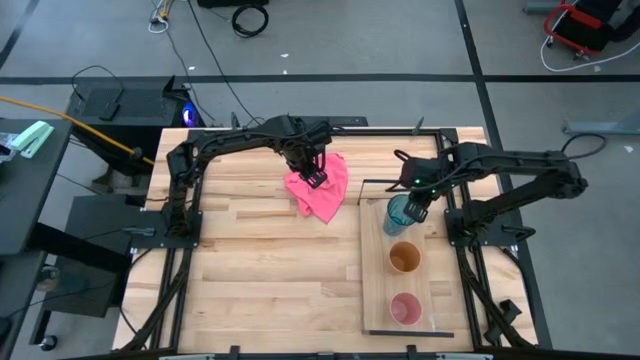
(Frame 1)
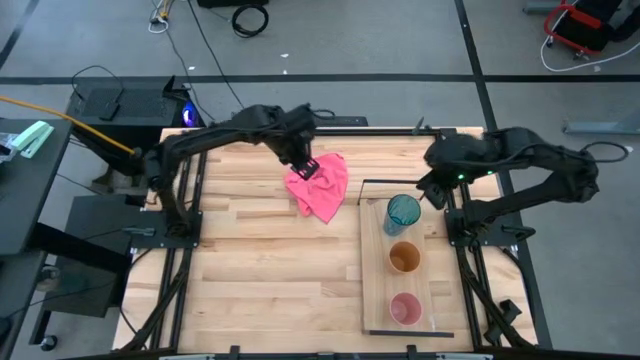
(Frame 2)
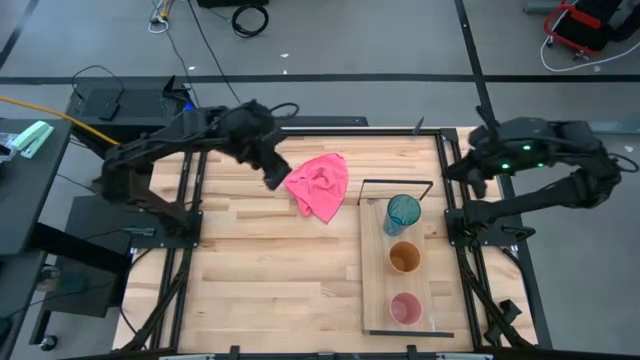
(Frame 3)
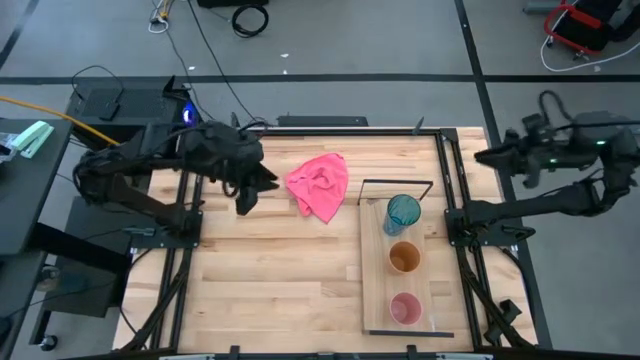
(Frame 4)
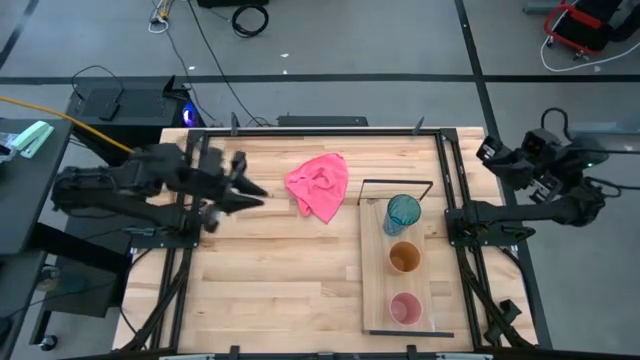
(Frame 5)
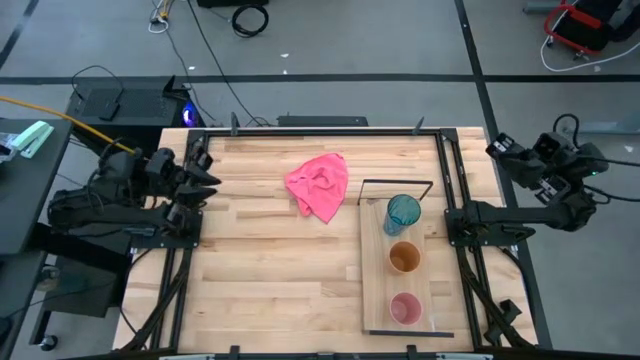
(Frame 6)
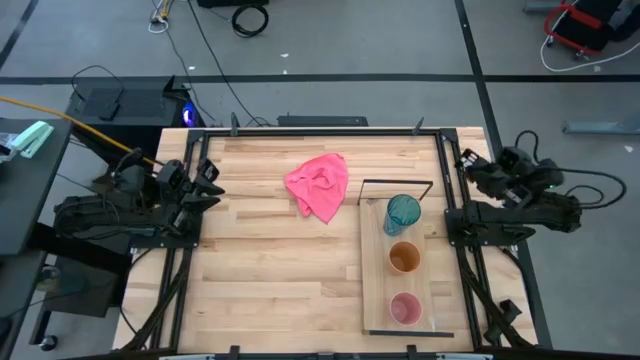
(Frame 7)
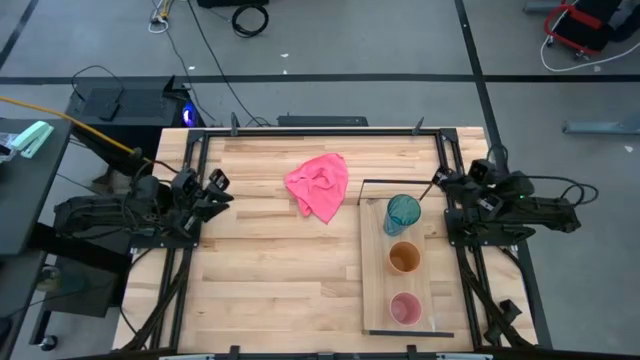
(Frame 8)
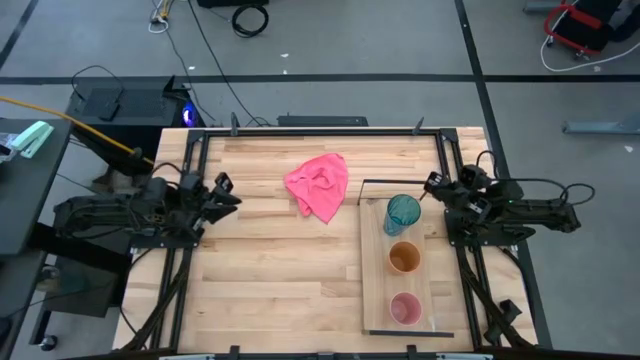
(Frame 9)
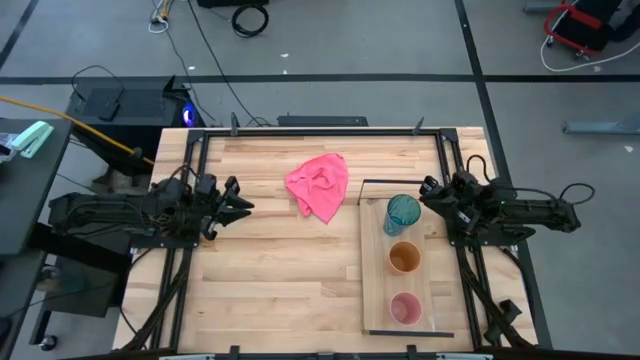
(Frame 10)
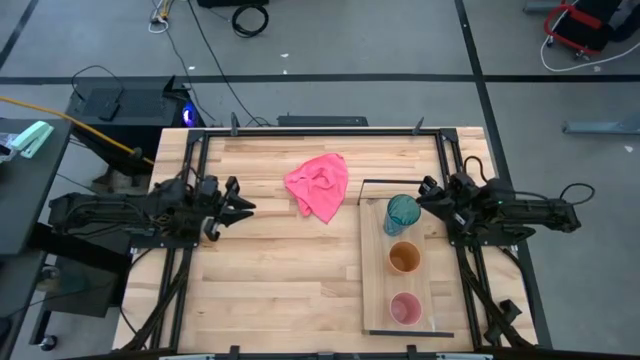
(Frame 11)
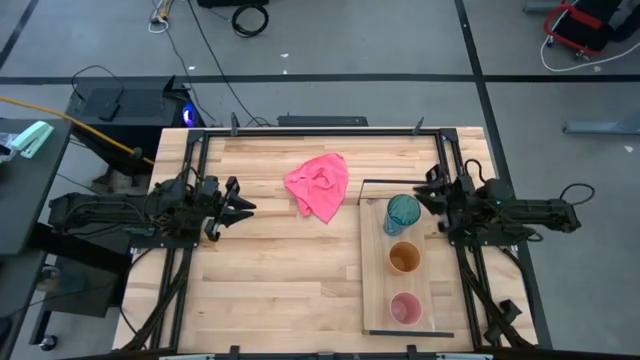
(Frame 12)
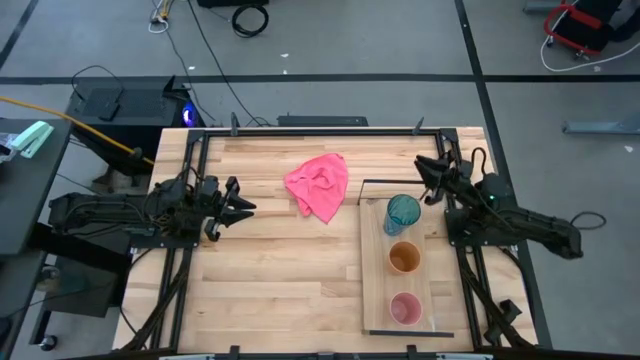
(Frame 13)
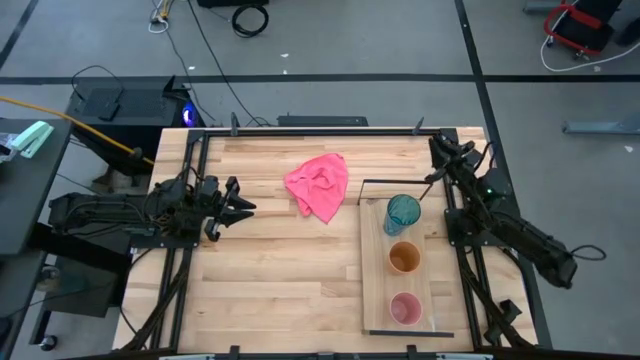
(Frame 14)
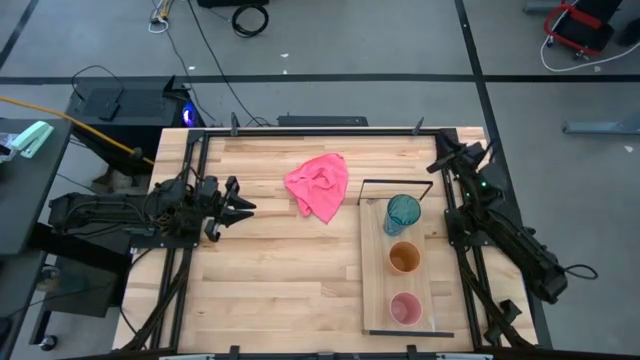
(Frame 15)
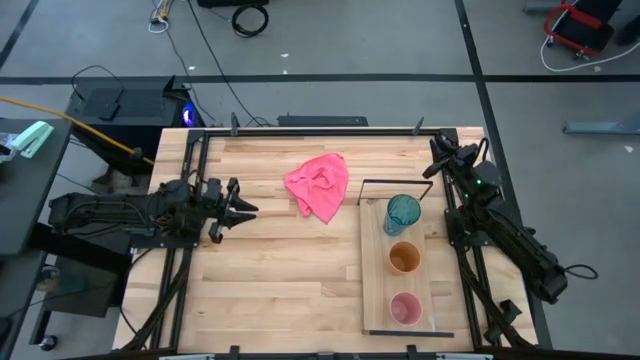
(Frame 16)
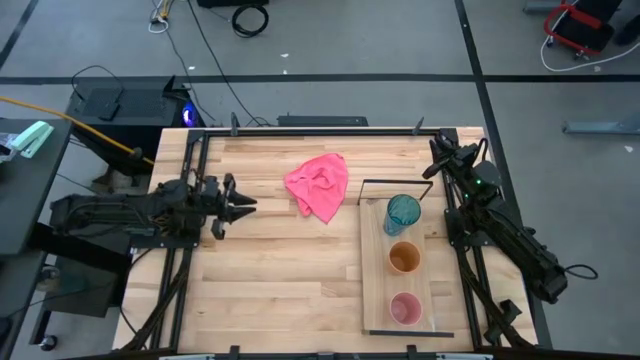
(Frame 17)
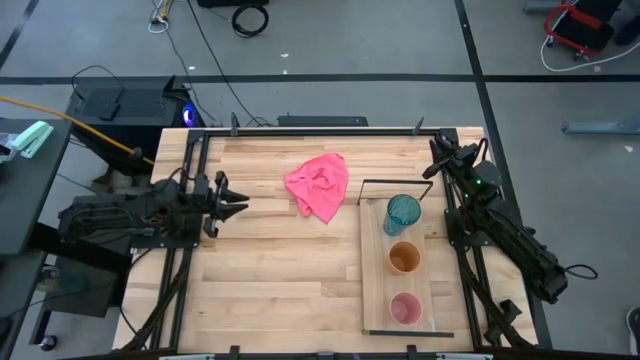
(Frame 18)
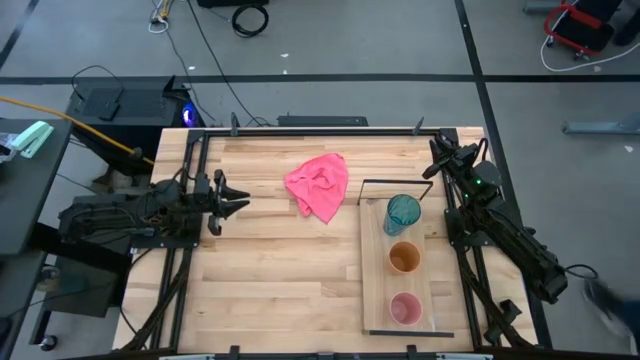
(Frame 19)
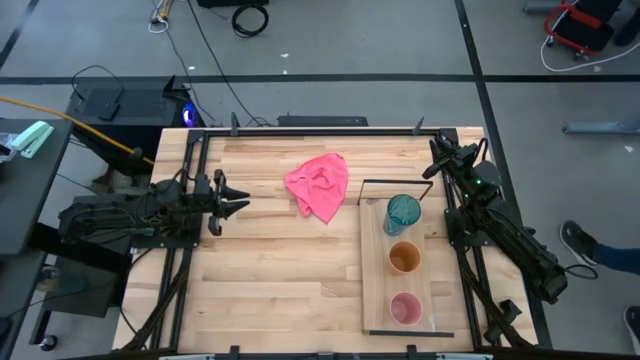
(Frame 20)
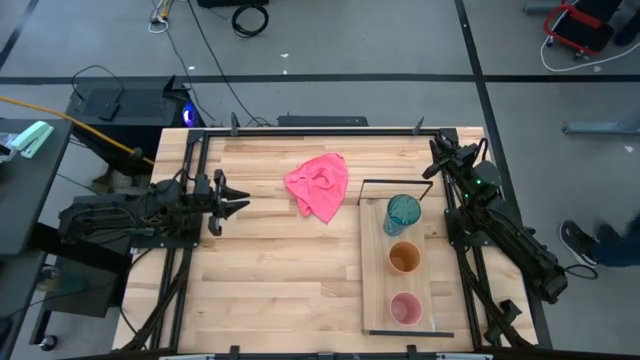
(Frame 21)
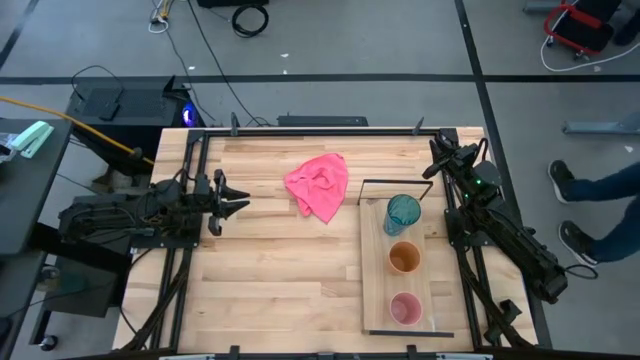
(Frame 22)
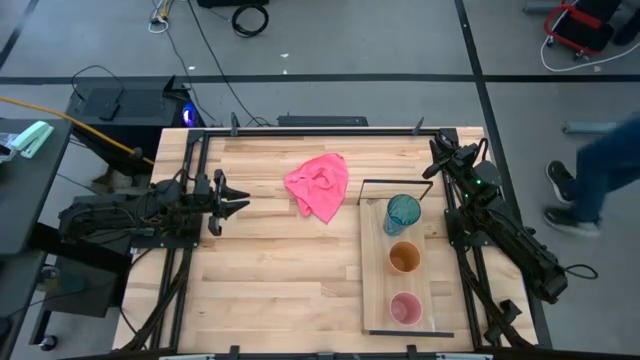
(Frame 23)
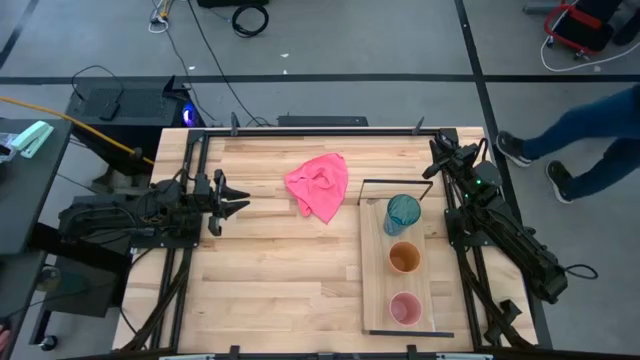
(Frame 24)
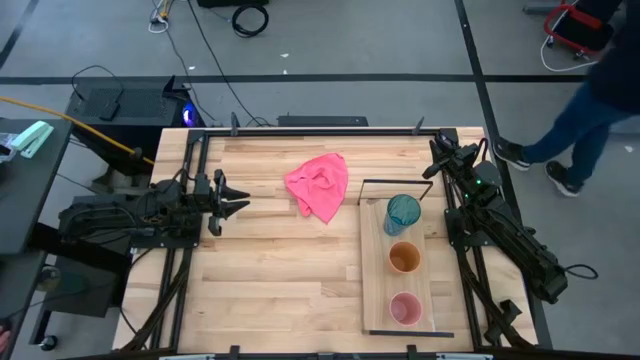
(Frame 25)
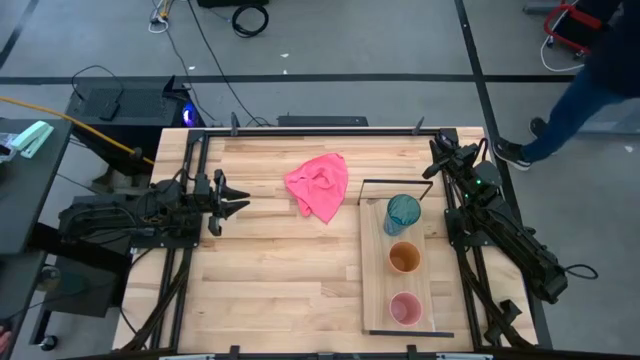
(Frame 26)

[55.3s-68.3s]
Task: Stack small to large cups/mugs on shelf
Return to Home Position

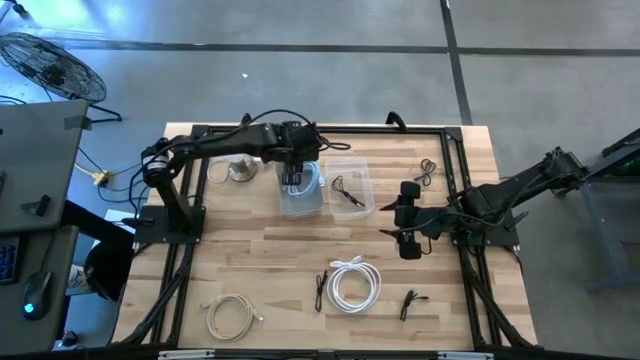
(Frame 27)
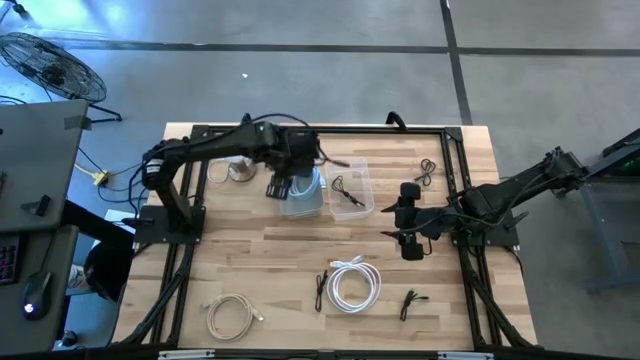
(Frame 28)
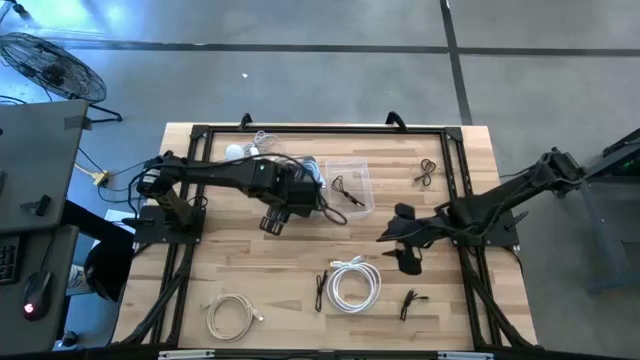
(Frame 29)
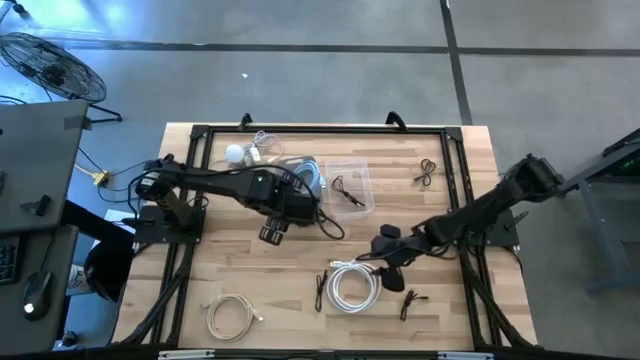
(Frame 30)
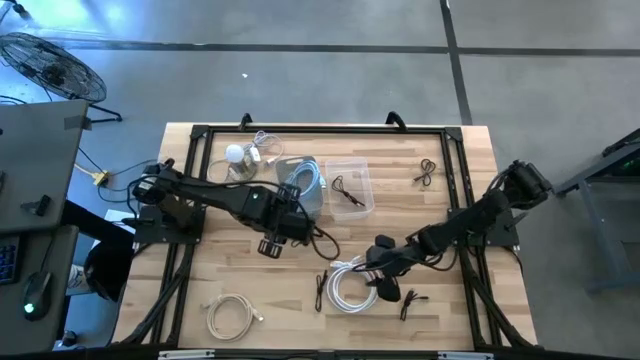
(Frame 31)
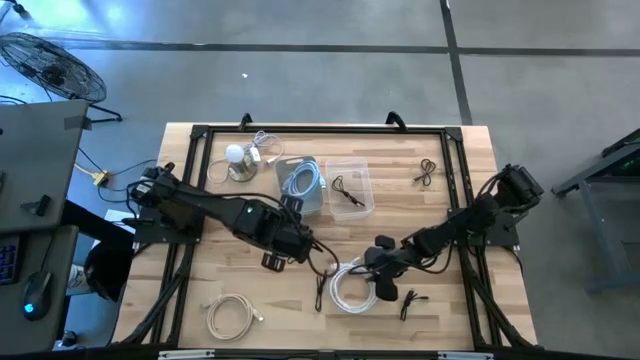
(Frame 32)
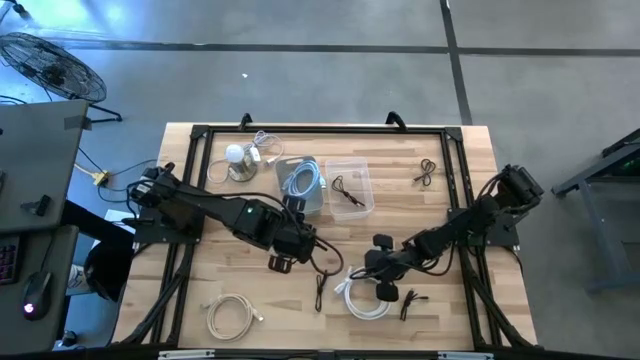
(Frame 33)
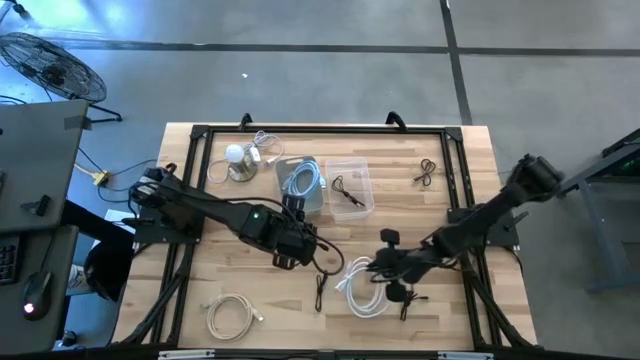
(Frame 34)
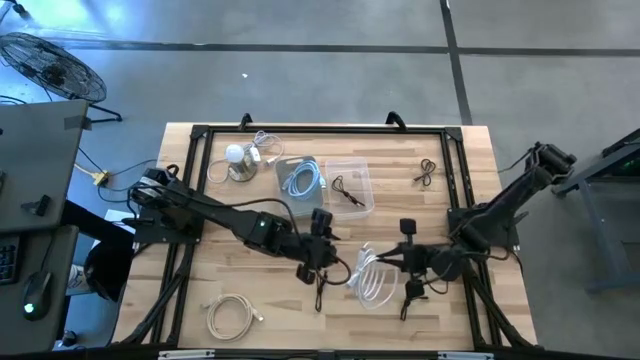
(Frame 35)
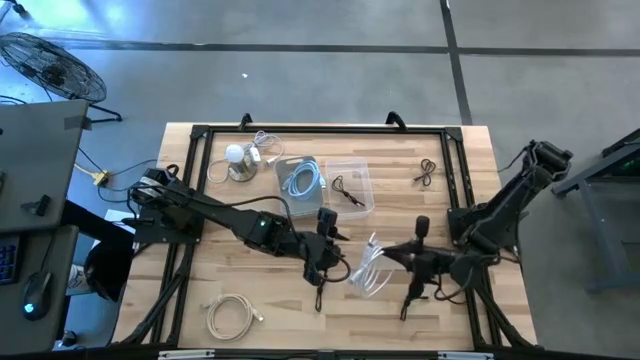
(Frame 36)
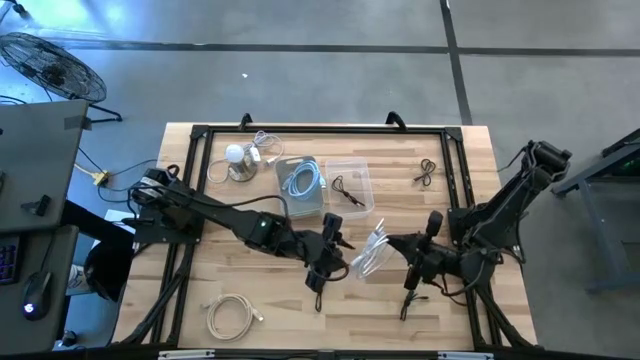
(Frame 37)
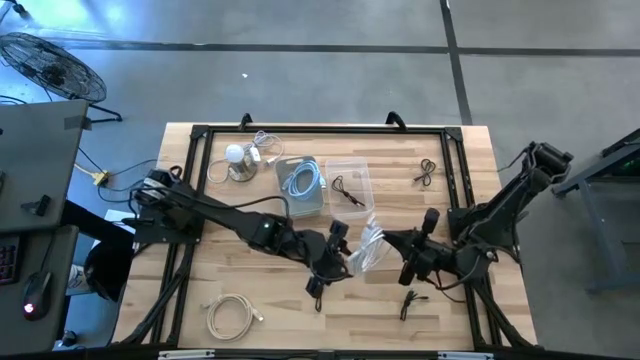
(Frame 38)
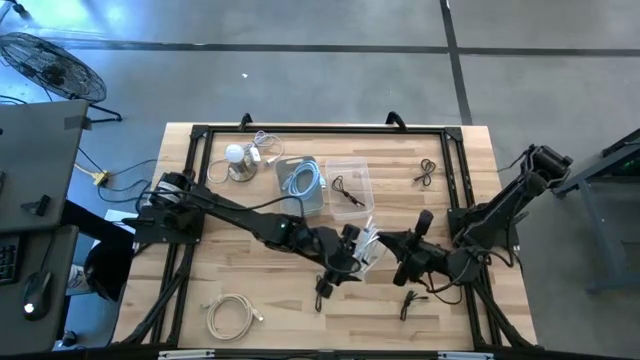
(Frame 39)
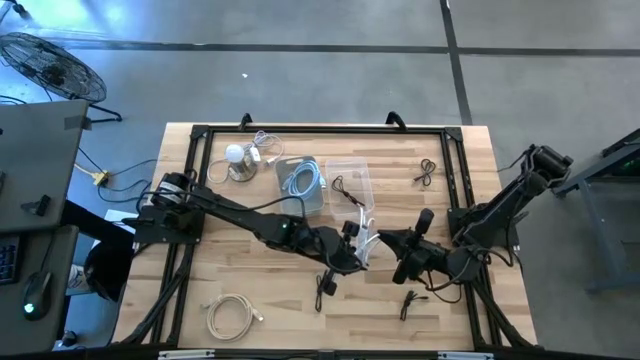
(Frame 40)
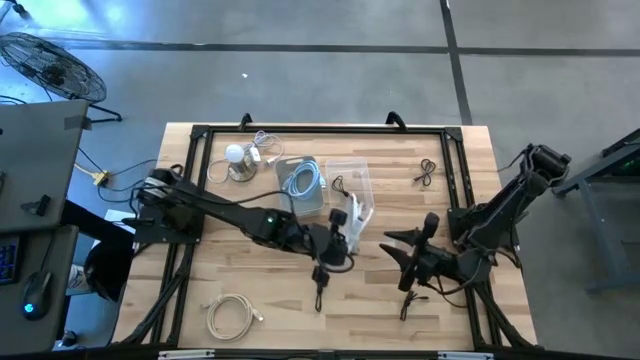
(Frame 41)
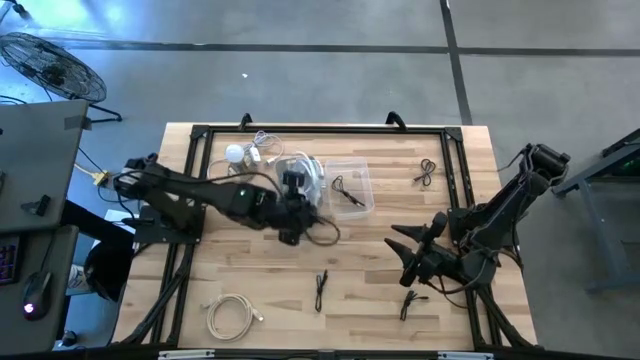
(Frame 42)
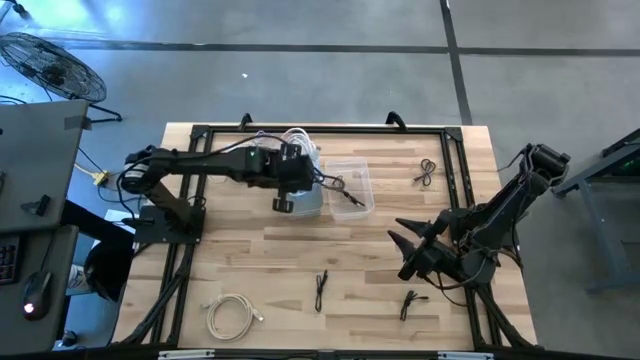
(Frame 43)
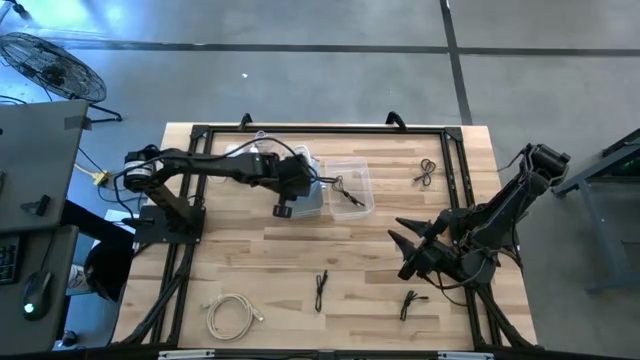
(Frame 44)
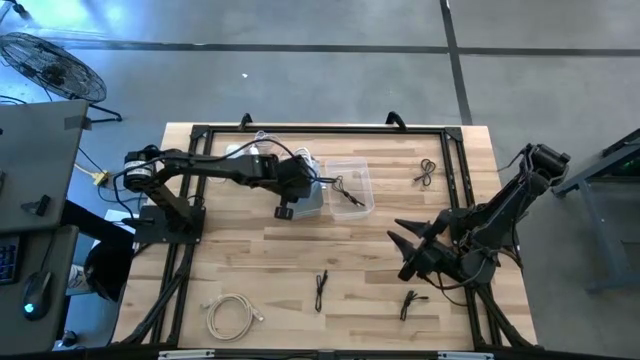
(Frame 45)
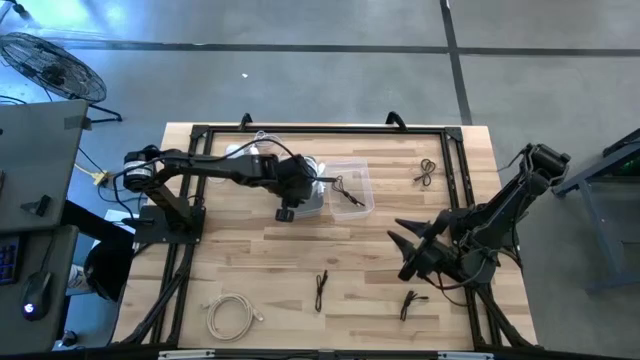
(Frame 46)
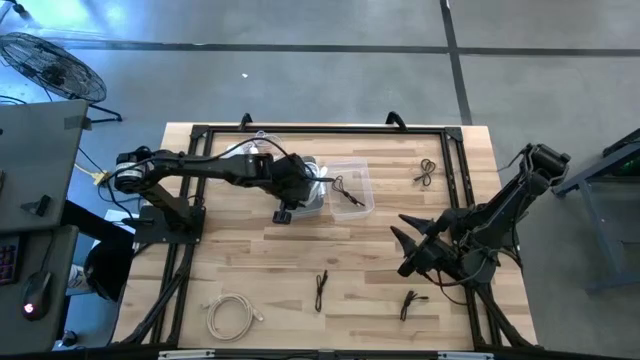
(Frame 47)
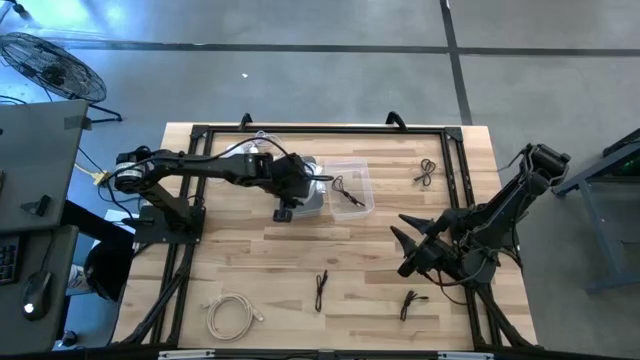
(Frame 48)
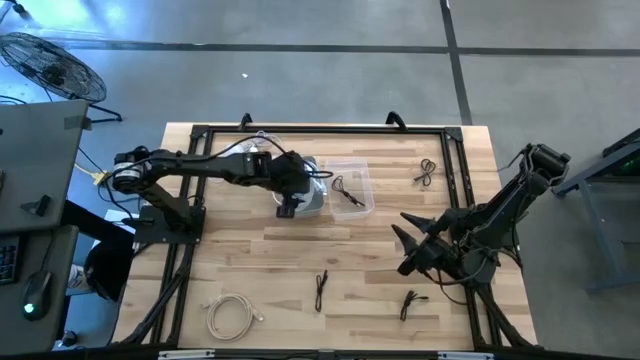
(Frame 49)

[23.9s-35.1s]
Task: Pick & Place USB Port
Put the white HDMI cable into the gray bin
